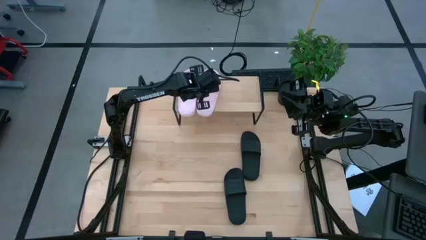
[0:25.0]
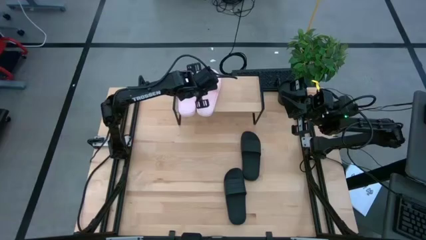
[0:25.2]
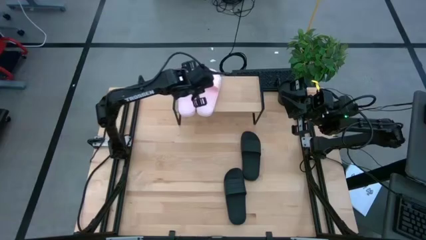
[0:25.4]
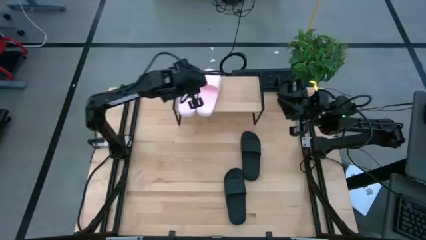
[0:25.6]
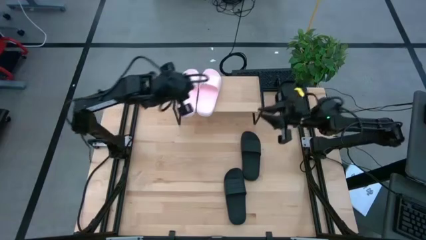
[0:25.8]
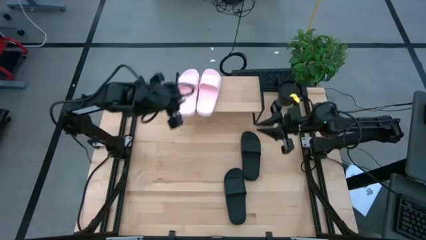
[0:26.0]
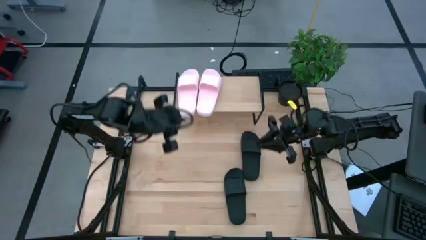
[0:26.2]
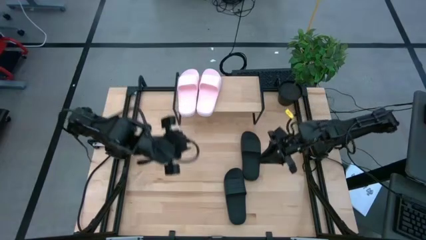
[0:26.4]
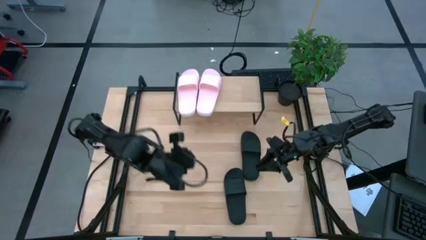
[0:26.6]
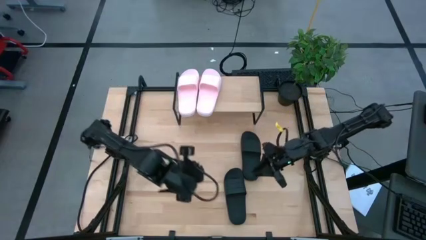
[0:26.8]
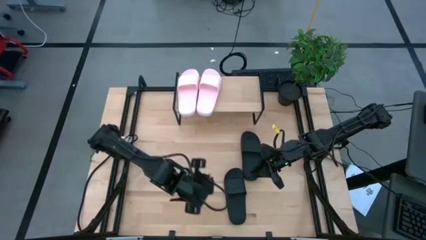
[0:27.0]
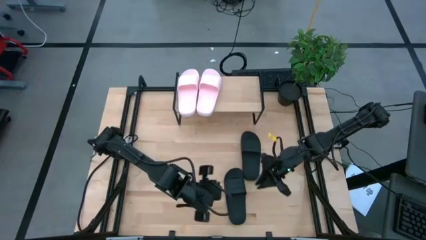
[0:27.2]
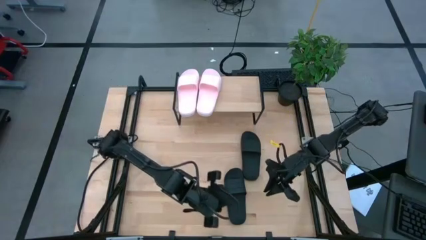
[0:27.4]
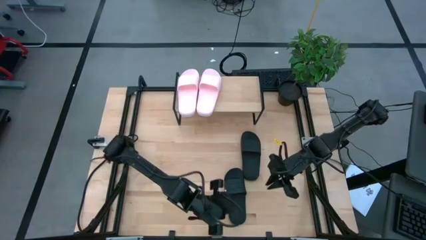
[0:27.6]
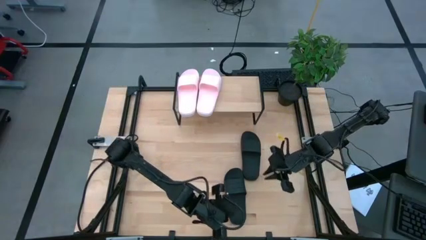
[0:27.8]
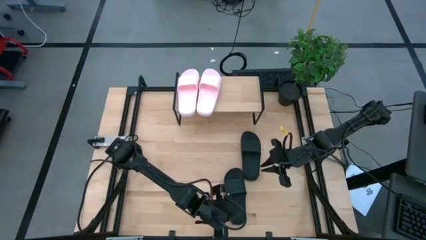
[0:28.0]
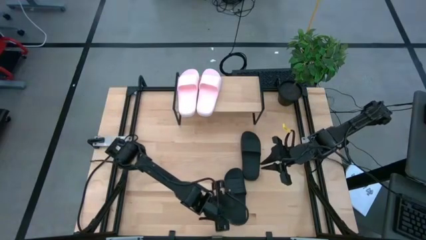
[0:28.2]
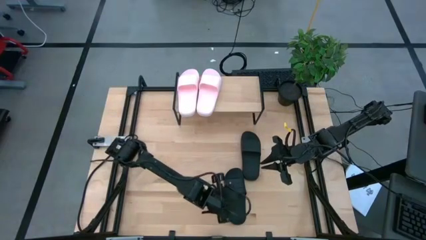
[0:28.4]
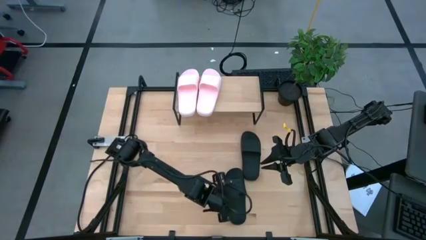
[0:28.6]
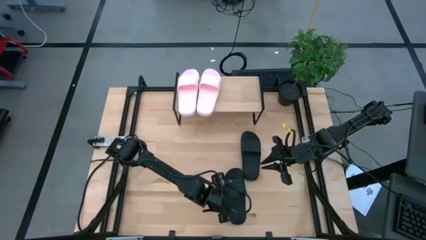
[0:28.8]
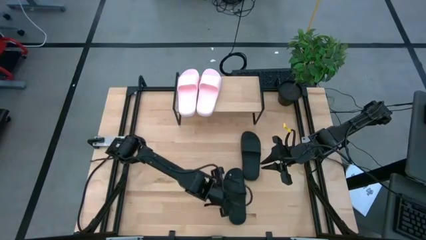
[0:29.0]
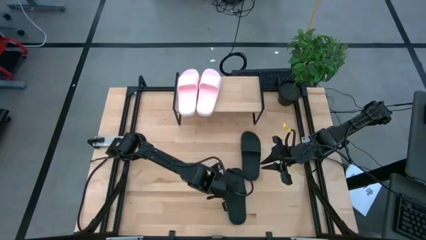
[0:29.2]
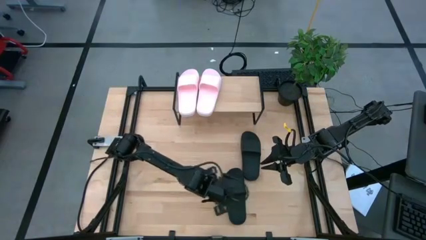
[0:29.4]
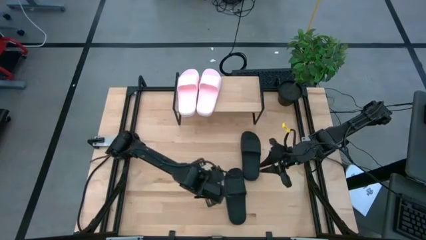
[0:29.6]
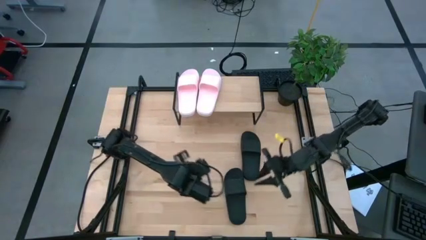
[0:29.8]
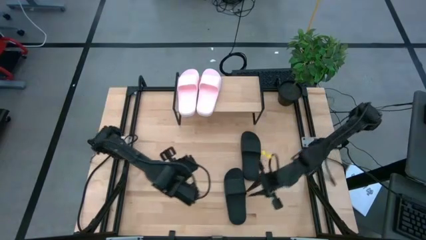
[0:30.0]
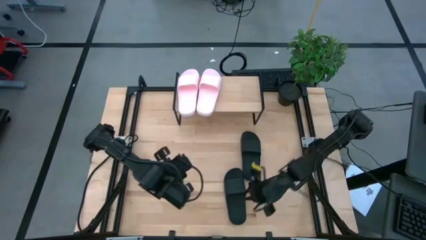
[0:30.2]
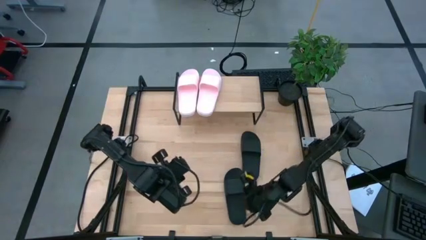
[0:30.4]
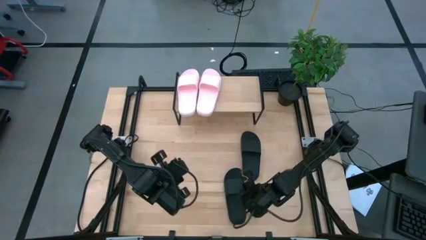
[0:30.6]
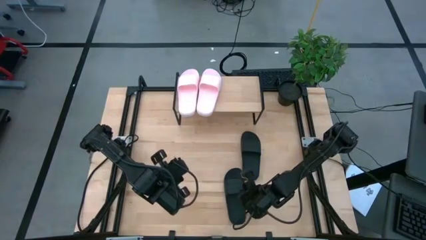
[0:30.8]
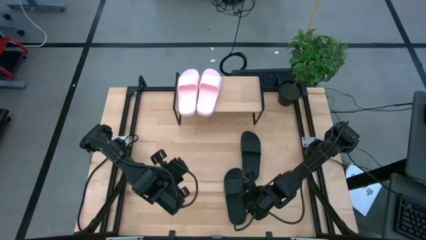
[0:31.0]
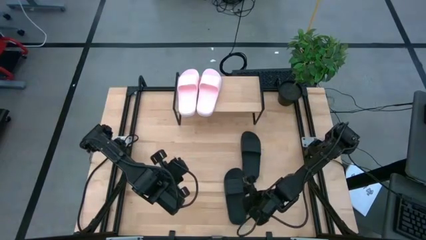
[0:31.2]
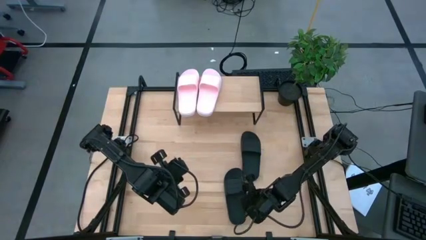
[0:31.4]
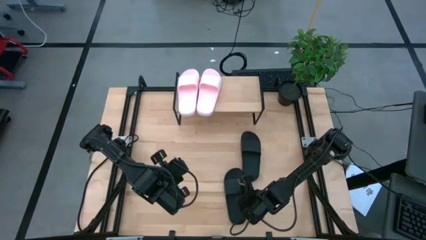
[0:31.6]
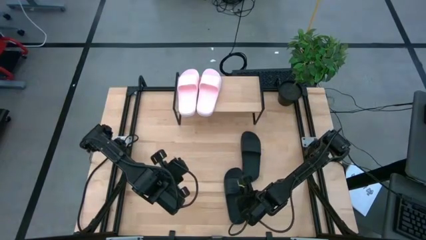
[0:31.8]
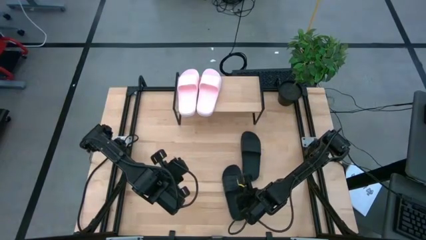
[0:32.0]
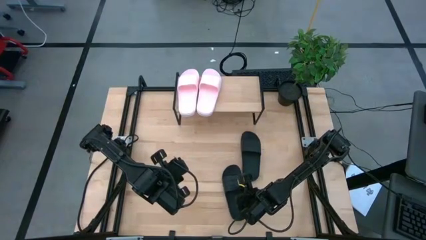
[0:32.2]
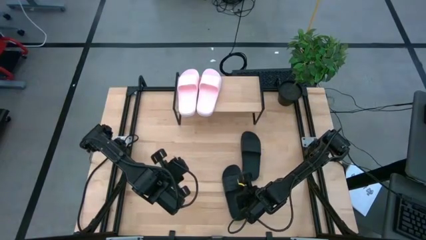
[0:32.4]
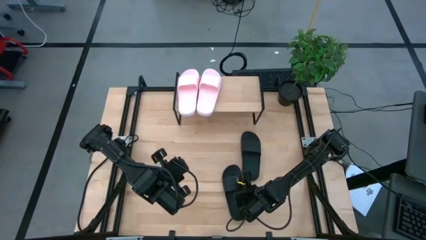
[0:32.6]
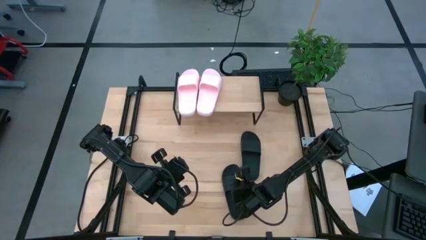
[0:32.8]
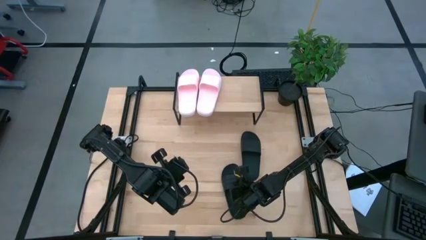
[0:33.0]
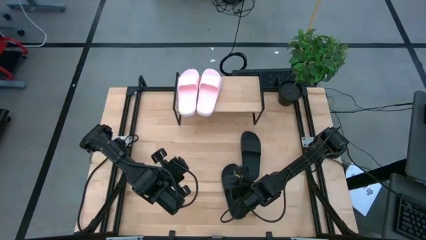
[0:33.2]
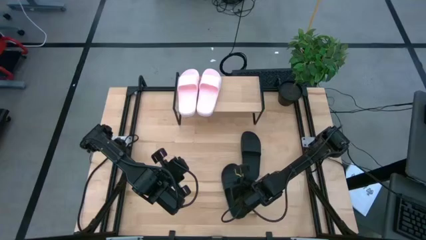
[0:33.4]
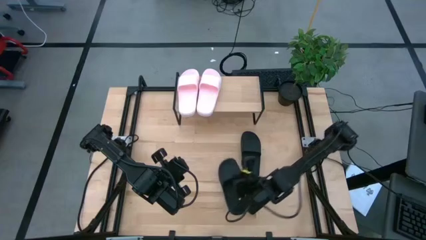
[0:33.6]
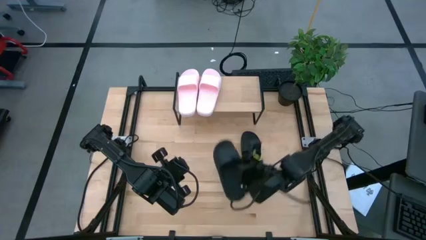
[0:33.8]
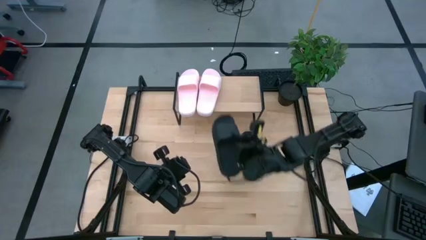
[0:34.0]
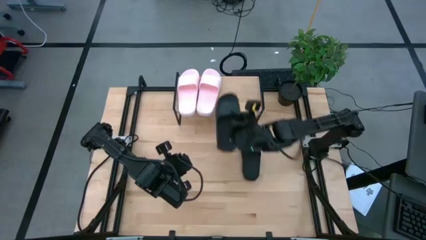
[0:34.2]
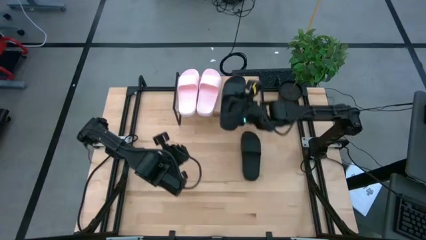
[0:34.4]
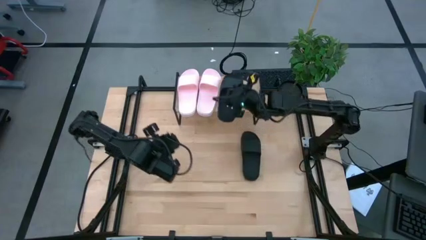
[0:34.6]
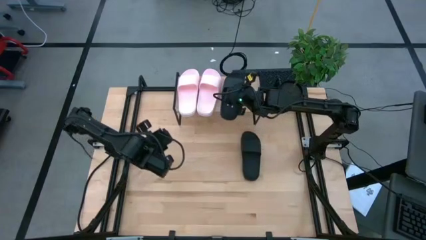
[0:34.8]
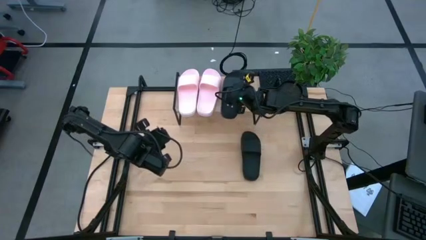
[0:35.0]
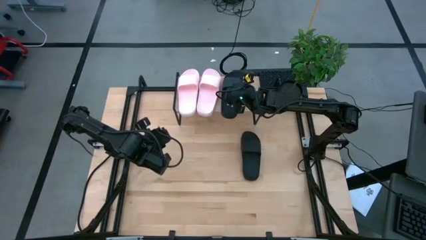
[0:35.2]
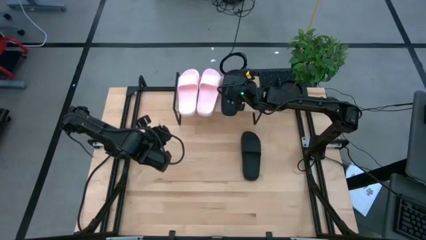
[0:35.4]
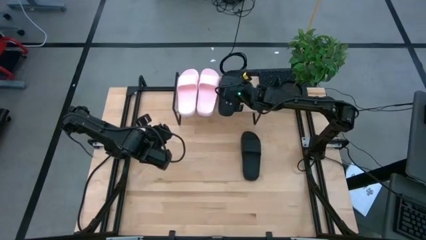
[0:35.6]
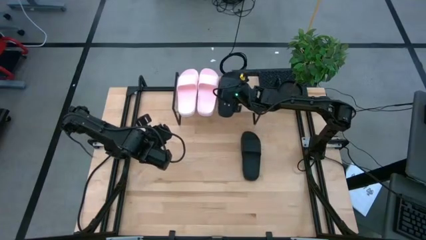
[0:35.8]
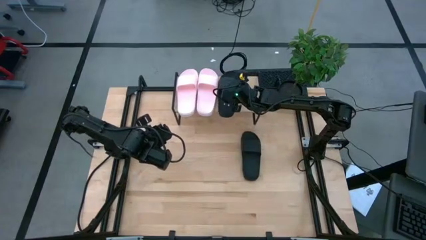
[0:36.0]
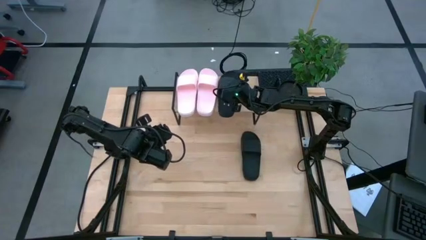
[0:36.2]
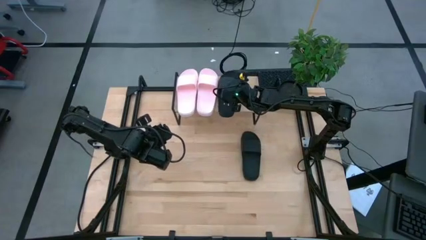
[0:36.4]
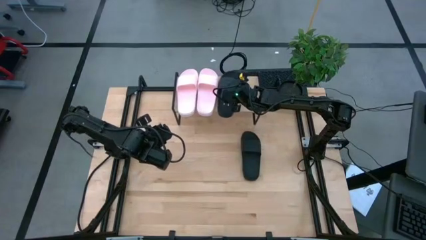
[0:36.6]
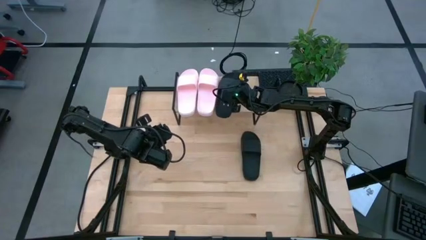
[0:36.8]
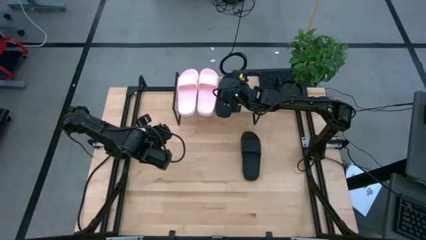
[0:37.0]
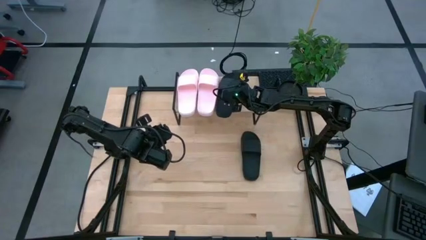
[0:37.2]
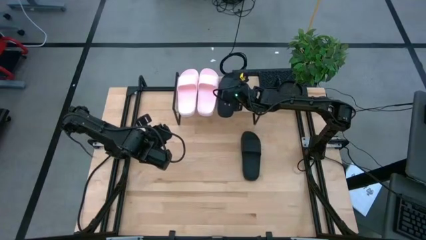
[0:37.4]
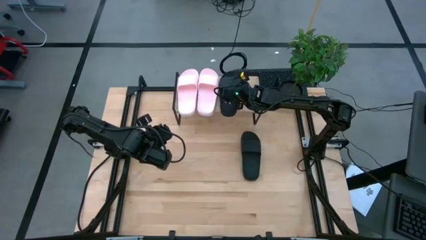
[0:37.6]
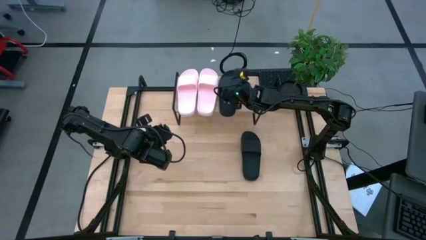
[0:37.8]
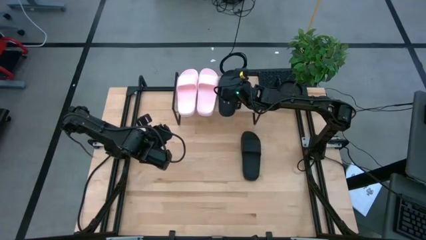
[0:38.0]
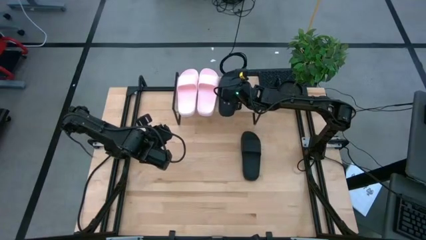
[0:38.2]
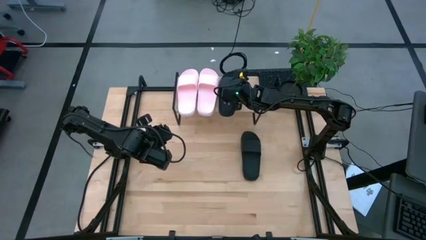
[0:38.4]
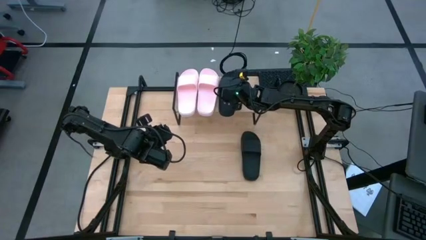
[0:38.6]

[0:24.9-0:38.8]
Task: Pick and place slides into the shelf
Put the bottom black slipper on the shelf
